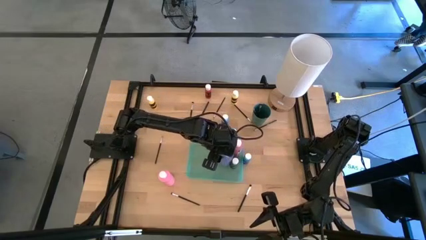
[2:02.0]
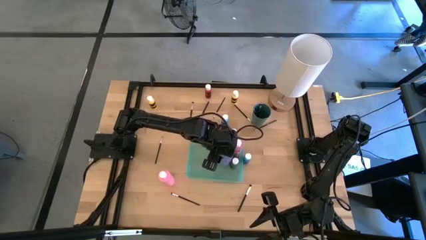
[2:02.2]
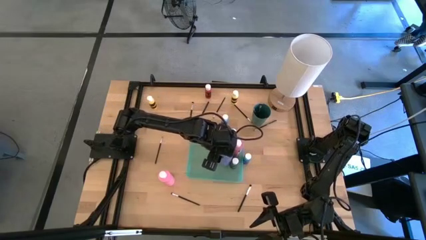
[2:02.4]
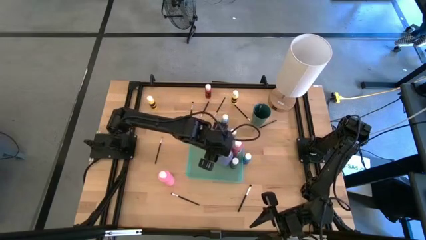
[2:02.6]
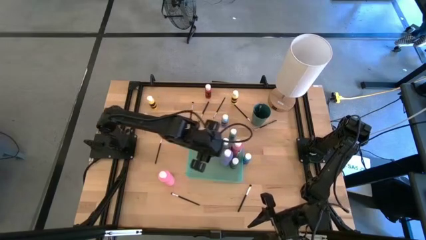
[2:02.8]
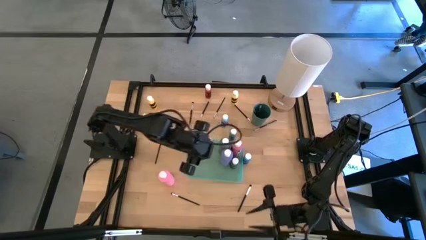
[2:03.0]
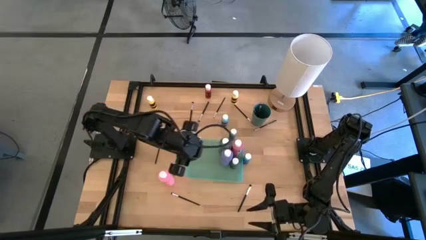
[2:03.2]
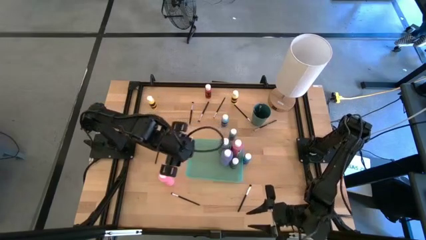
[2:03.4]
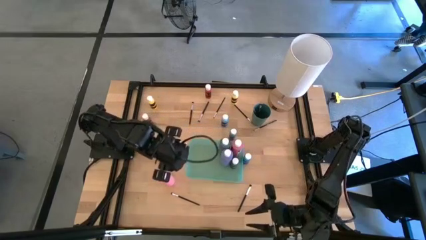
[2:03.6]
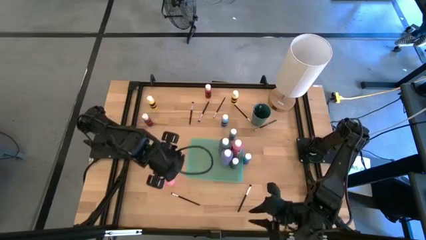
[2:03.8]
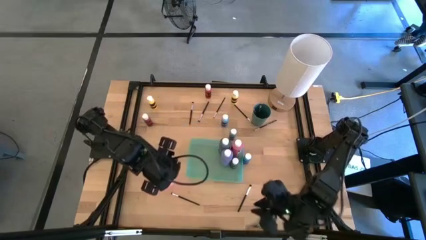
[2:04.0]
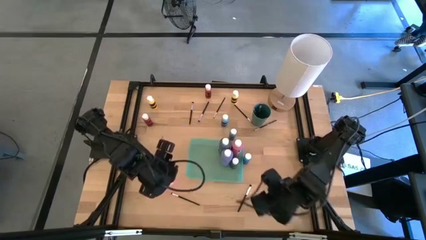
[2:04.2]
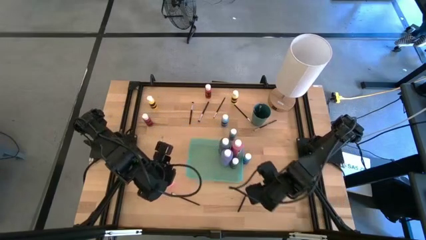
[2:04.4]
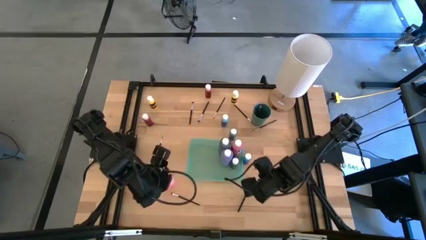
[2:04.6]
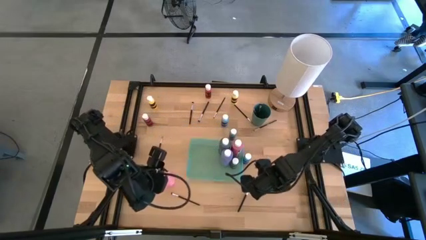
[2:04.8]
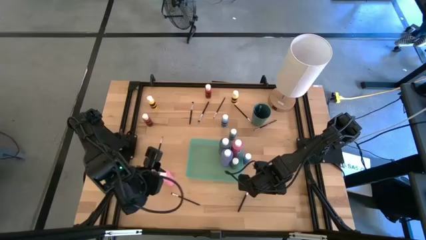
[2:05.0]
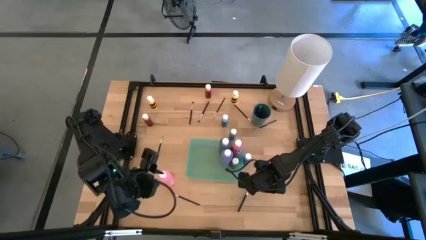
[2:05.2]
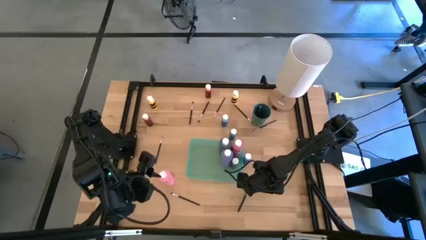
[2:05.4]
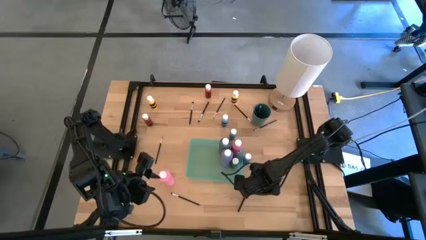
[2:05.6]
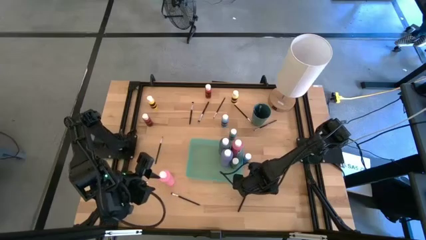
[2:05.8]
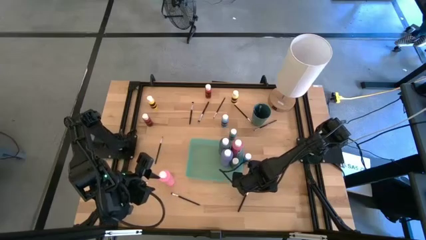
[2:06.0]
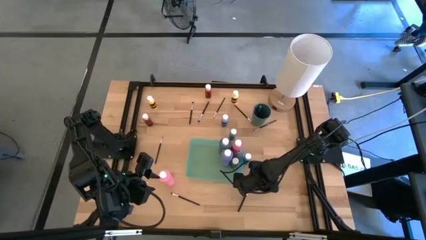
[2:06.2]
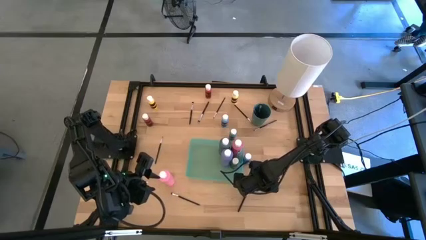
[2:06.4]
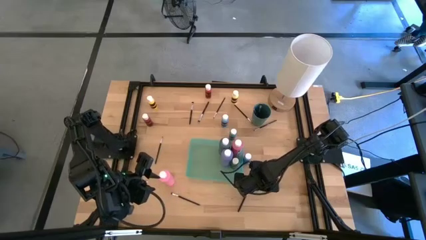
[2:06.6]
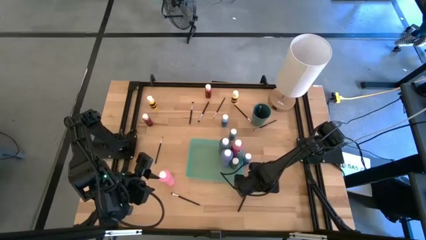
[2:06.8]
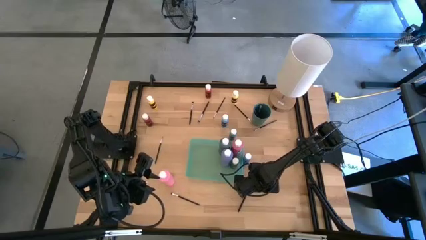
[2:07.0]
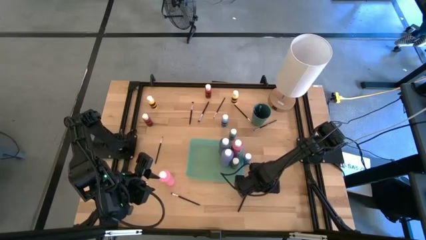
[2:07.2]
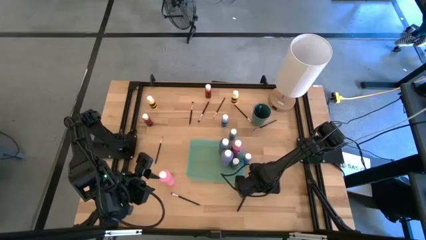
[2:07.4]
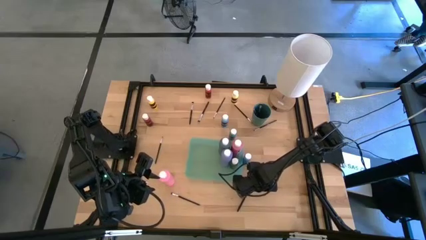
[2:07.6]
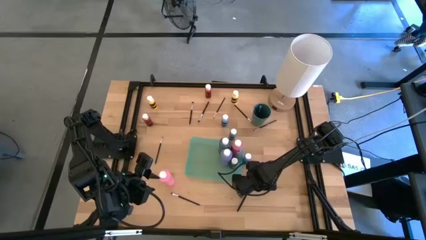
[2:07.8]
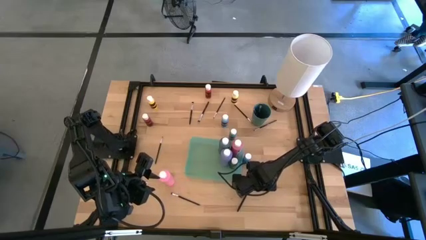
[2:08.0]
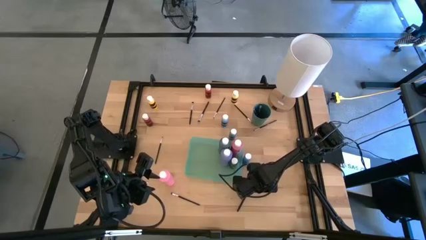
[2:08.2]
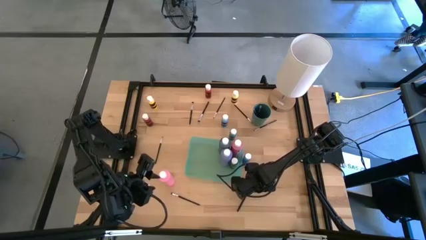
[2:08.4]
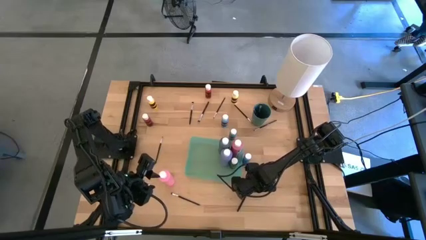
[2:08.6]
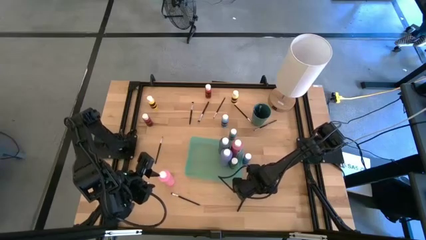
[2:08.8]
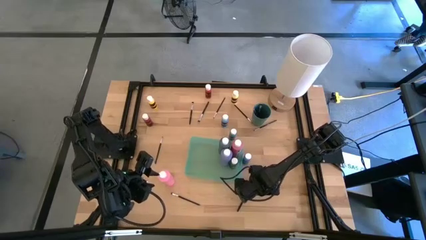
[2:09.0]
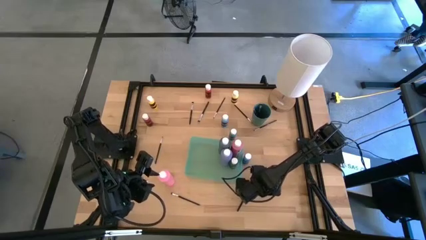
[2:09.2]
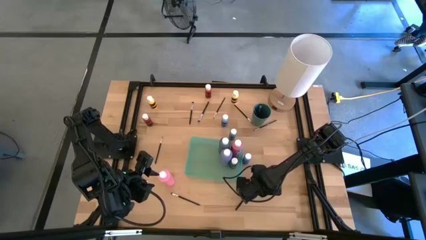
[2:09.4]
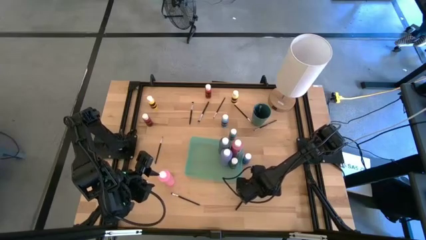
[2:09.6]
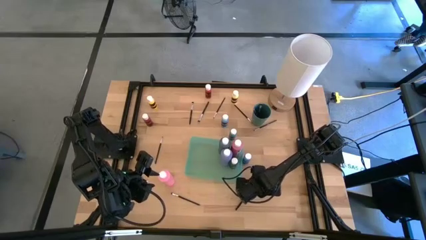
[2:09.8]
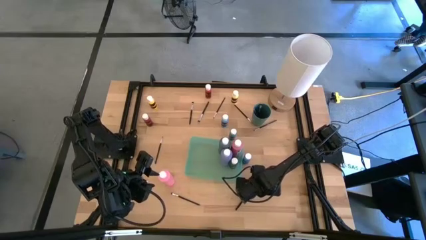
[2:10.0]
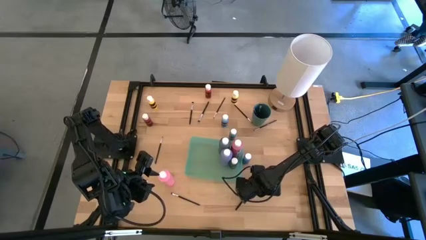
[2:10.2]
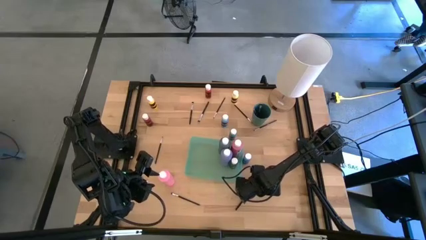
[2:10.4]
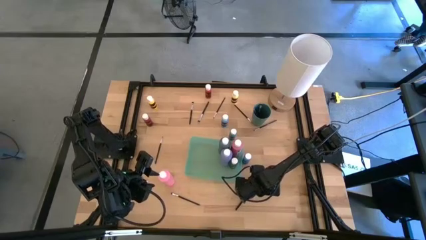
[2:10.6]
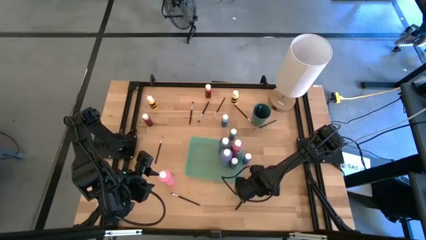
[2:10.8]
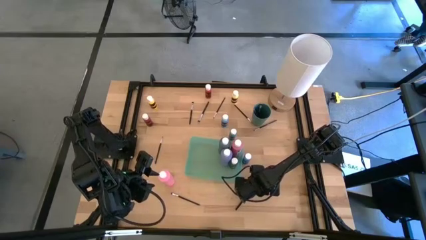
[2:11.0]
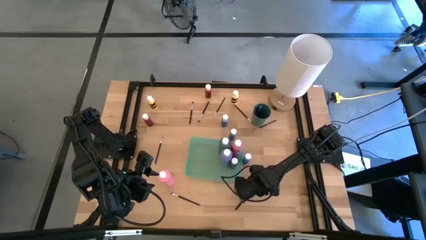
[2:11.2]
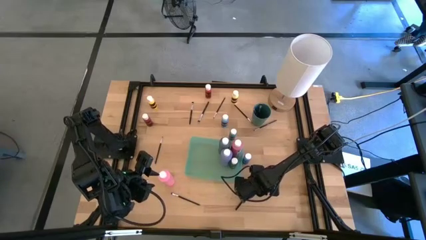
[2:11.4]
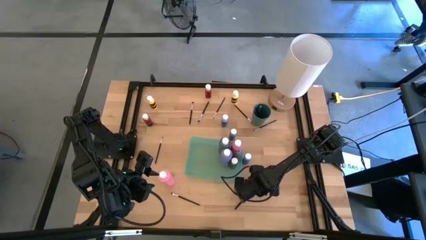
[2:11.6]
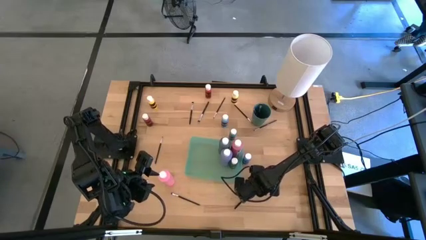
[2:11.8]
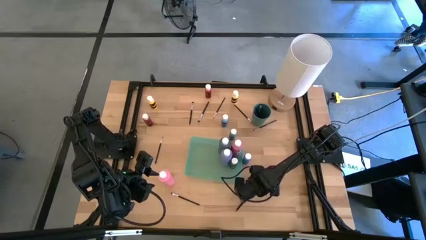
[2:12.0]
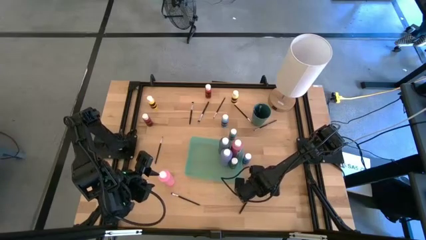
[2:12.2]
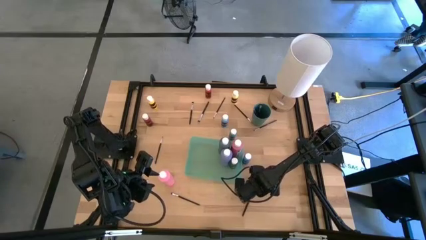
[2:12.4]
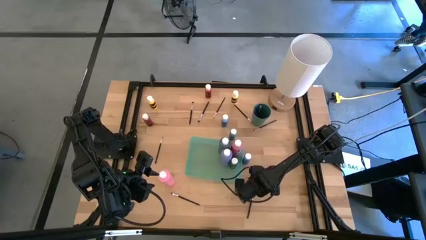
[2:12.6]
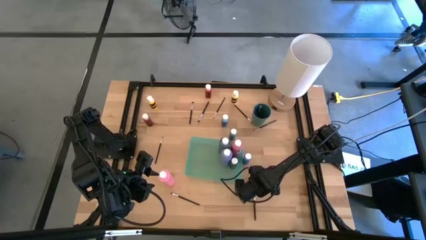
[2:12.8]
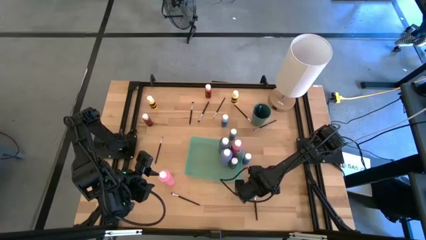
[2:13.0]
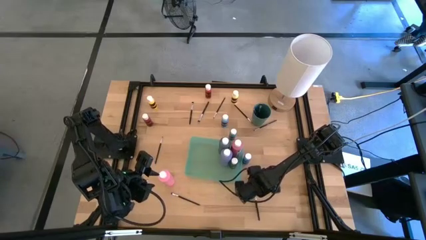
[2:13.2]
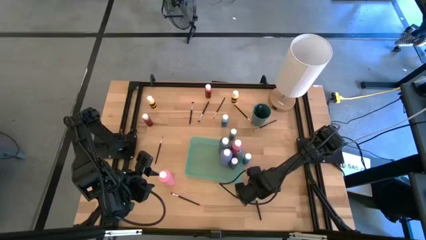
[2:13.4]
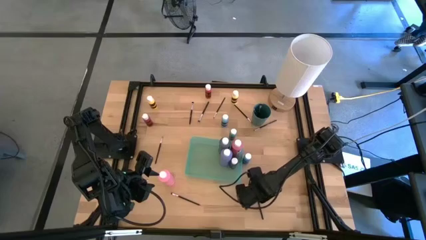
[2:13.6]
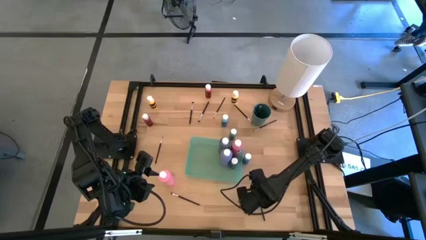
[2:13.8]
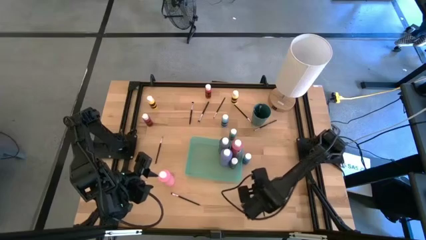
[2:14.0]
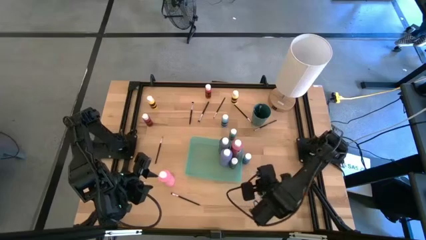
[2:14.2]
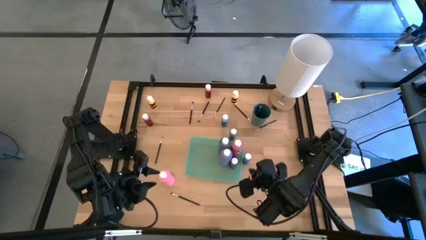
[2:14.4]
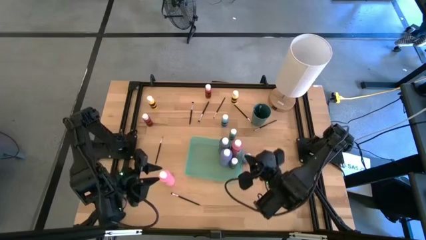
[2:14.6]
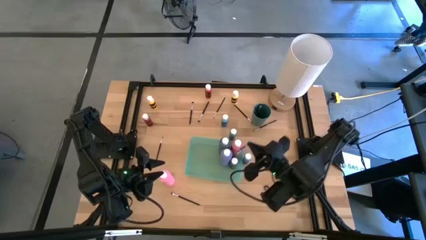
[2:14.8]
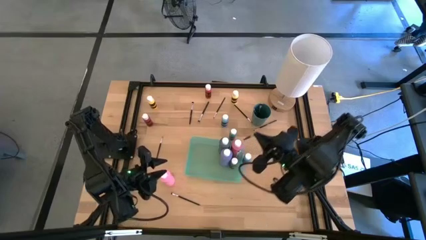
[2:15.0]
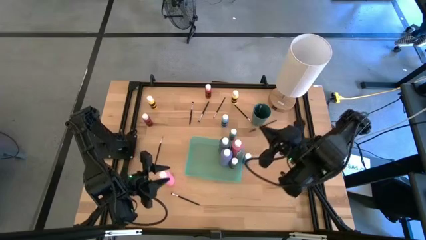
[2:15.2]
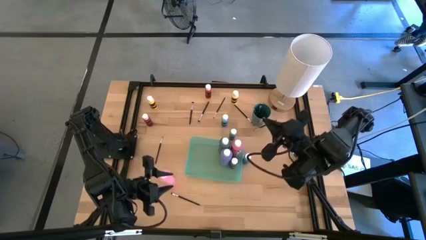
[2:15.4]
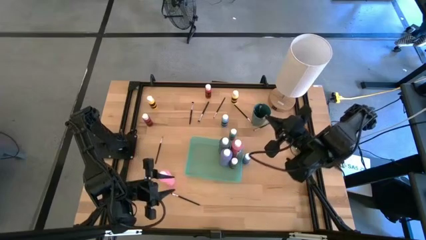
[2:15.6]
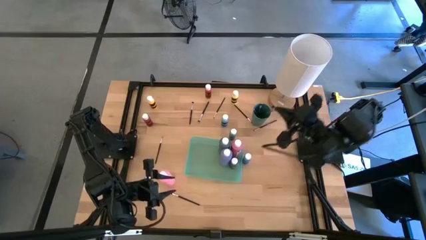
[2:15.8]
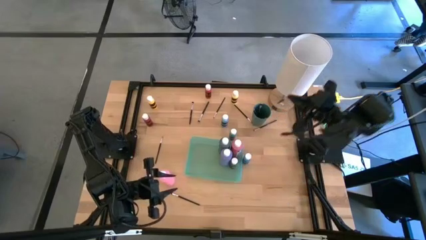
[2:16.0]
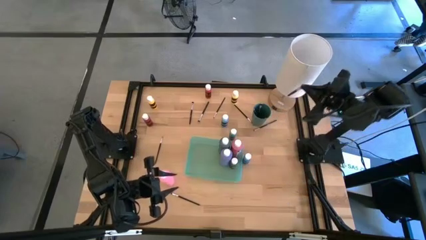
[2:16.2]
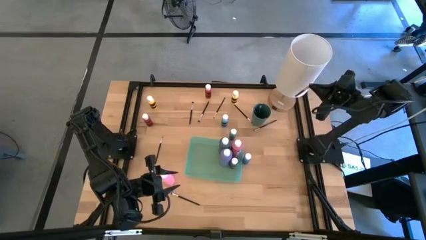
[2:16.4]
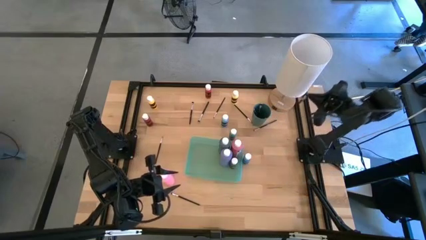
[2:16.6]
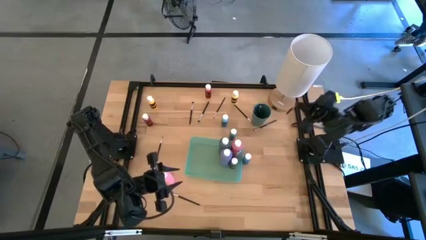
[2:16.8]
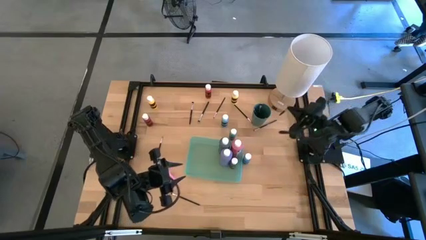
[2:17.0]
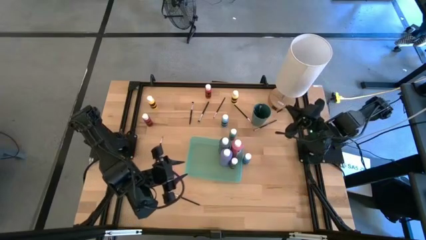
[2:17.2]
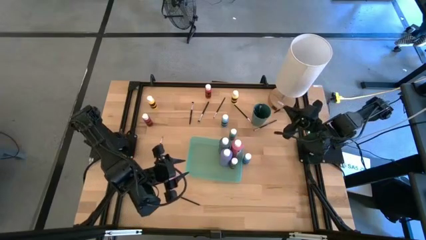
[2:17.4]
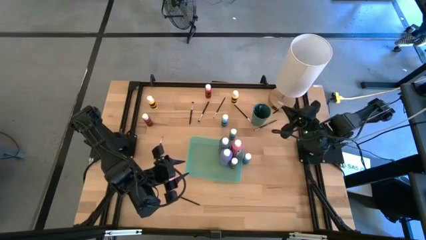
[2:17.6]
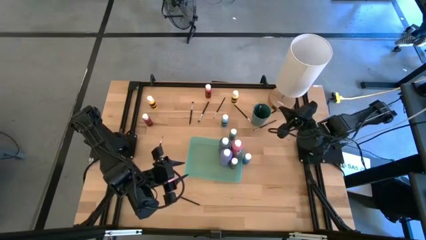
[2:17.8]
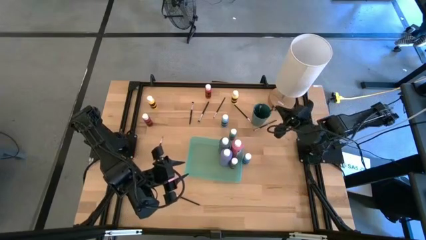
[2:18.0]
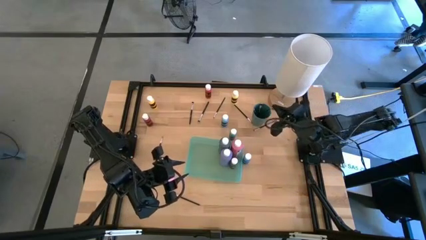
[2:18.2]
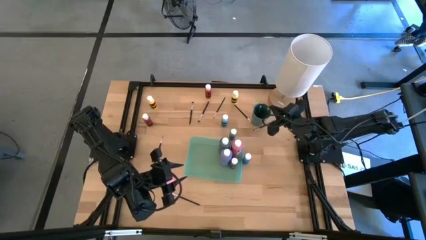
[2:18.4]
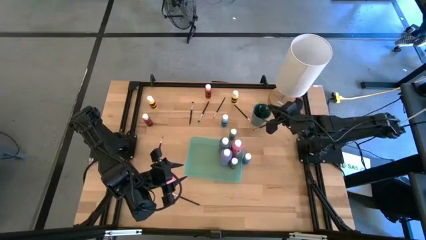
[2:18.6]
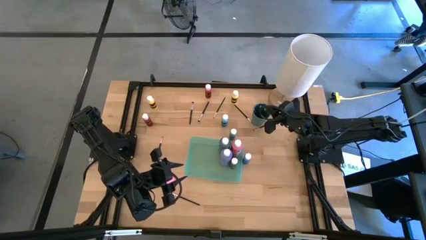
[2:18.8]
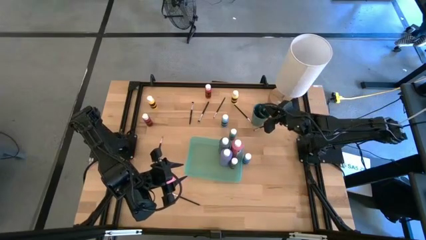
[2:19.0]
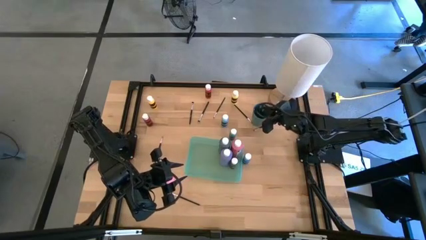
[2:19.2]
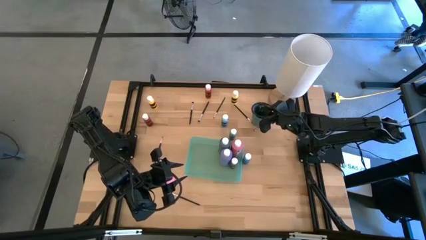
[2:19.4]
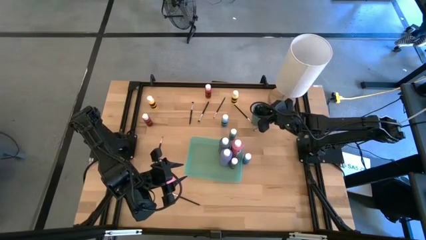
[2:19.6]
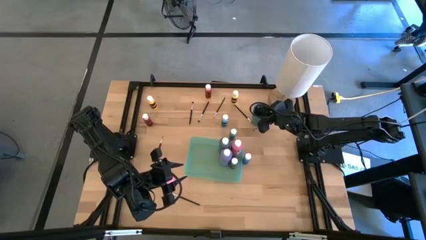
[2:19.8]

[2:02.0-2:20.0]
Task: Pick & Place Paint Supplies
Put the black eyeshadow brush into the green cup
